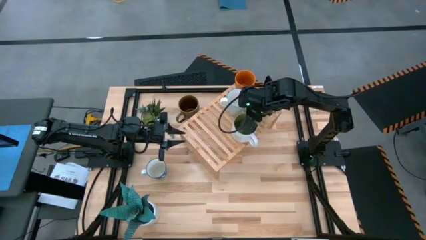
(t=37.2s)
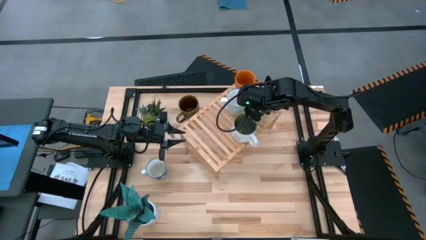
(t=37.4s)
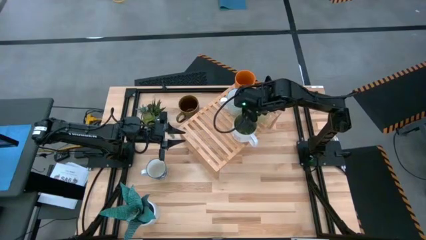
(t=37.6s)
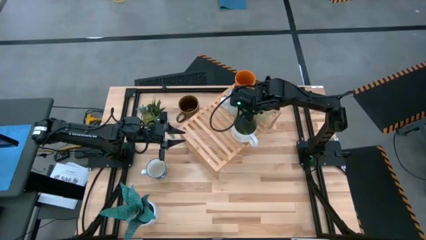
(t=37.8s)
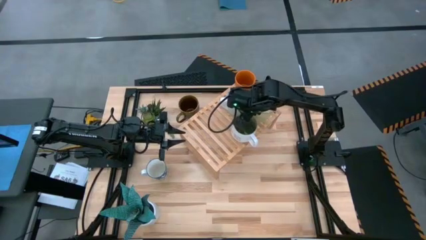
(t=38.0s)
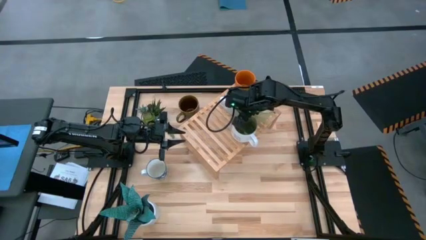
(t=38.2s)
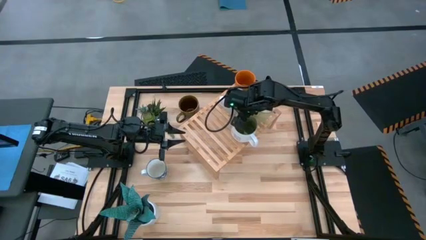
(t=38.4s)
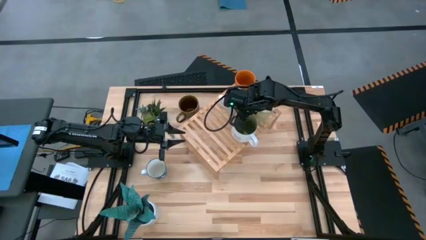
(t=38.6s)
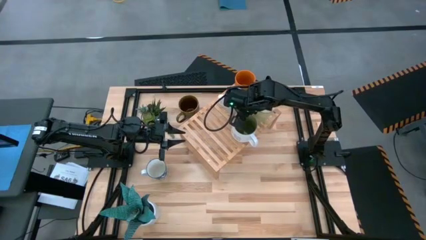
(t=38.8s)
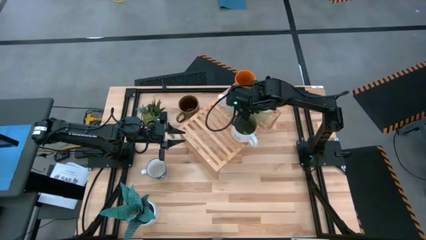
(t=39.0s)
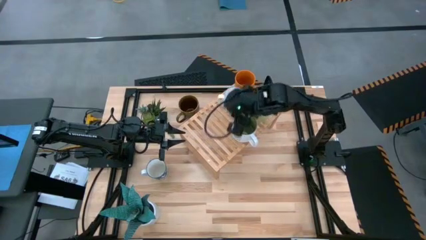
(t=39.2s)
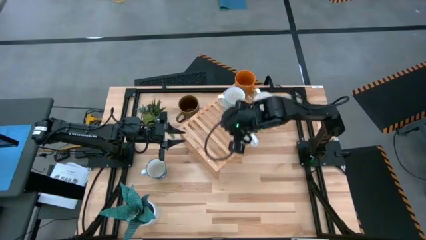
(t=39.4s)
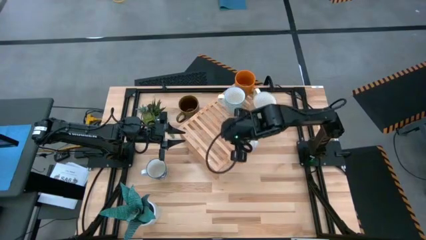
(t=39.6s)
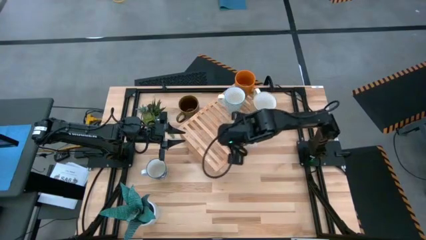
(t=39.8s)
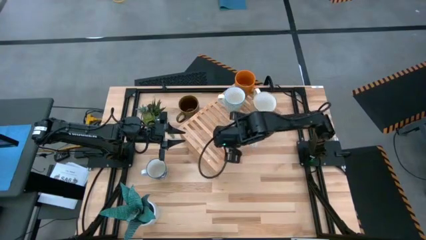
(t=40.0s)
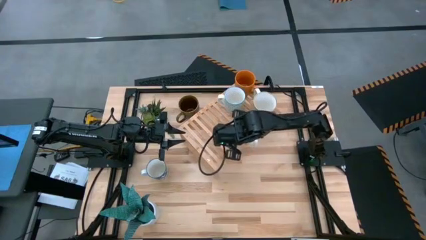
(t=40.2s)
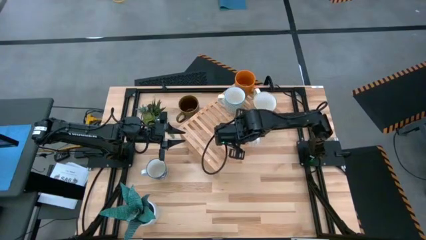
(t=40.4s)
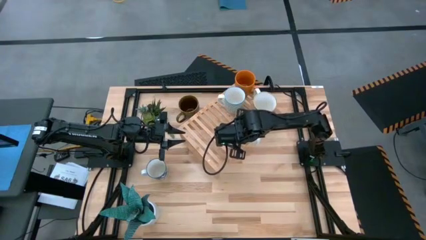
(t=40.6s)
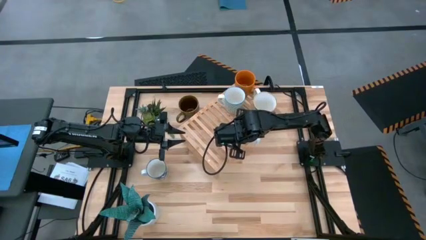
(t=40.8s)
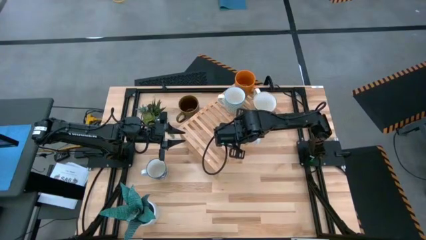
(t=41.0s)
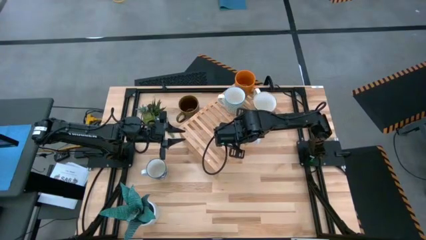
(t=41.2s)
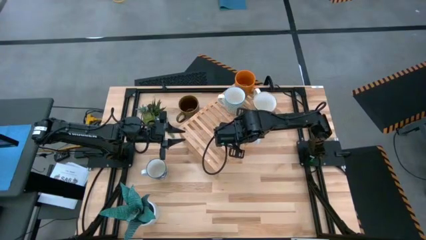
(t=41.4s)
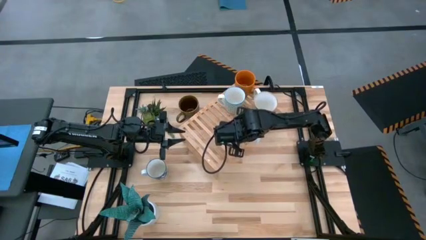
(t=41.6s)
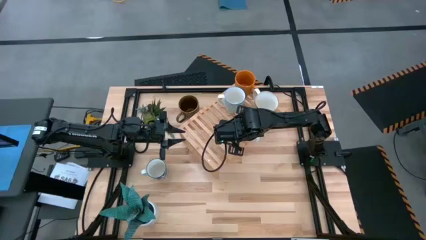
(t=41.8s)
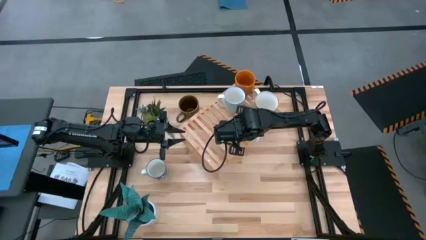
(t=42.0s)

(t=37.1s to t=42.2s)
Task: Place coffee mugs
Adjust the mugs on the shelf

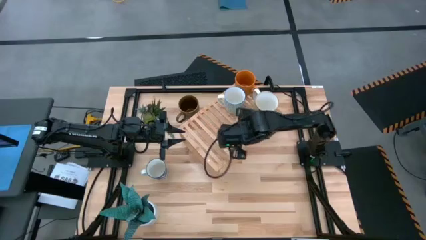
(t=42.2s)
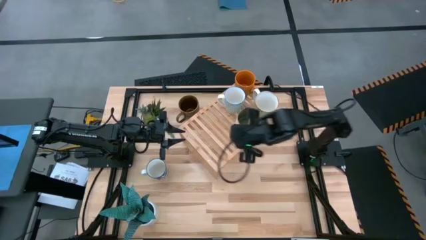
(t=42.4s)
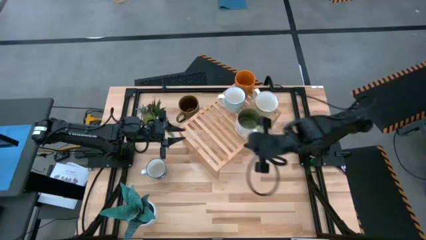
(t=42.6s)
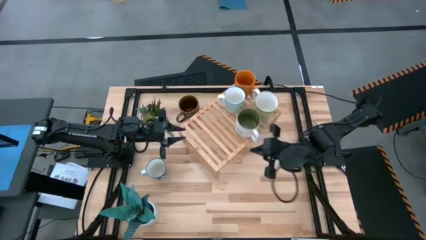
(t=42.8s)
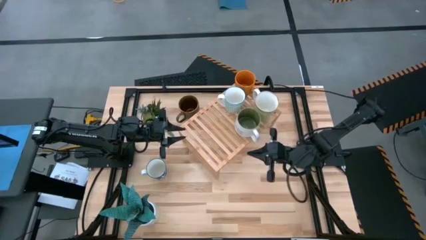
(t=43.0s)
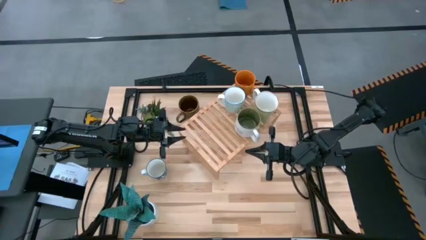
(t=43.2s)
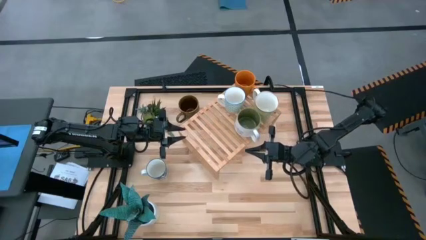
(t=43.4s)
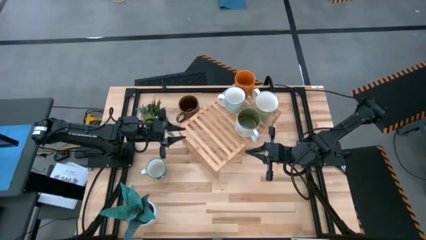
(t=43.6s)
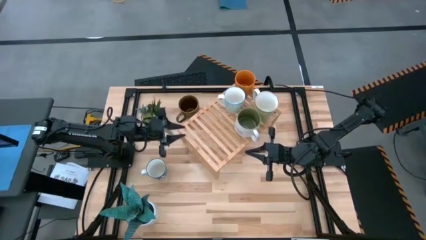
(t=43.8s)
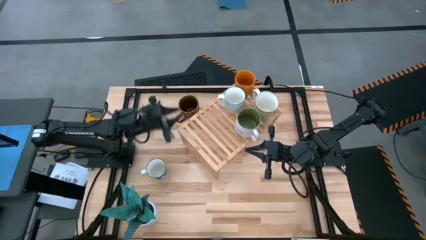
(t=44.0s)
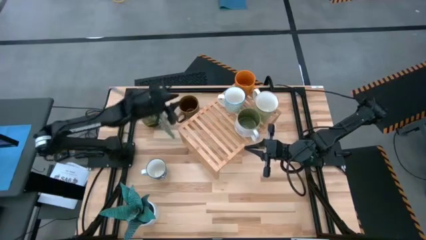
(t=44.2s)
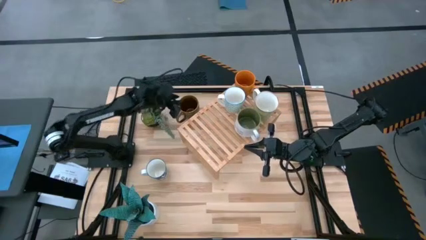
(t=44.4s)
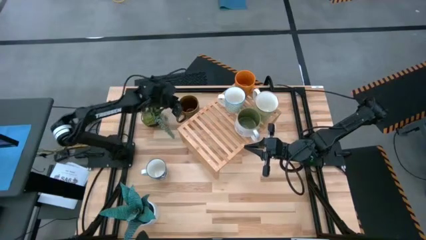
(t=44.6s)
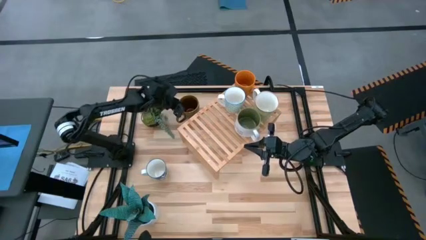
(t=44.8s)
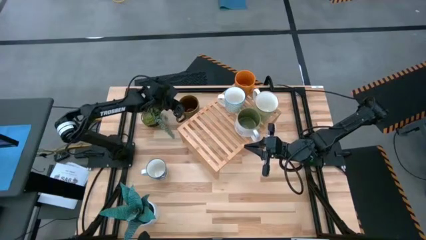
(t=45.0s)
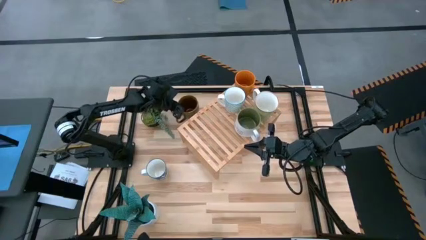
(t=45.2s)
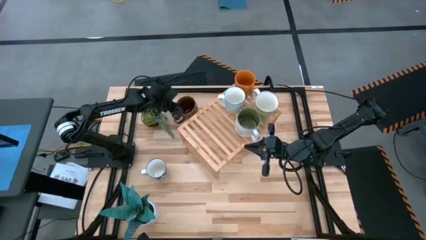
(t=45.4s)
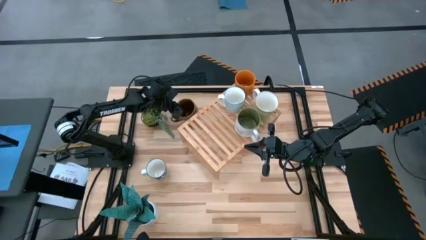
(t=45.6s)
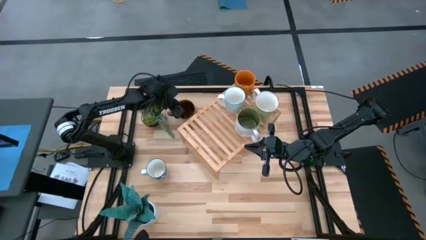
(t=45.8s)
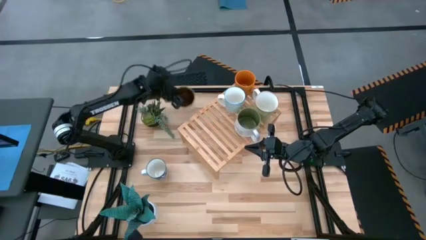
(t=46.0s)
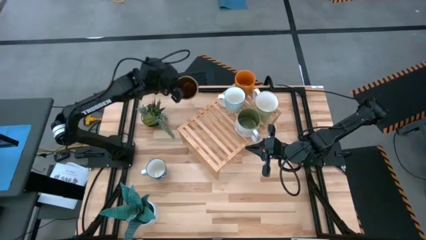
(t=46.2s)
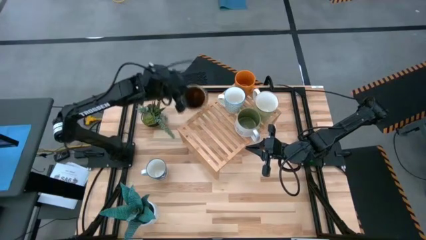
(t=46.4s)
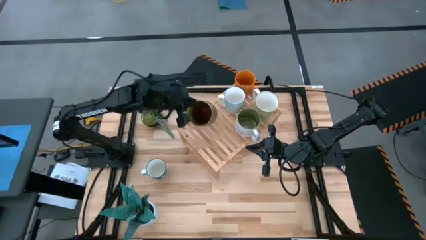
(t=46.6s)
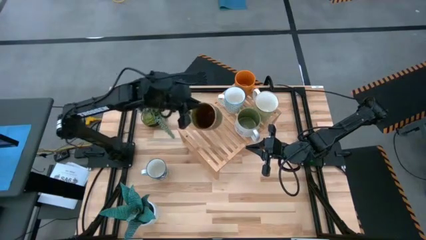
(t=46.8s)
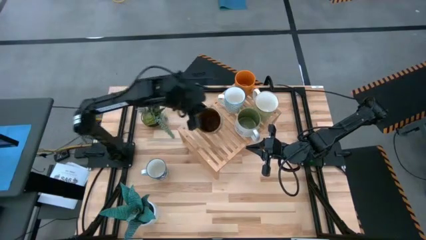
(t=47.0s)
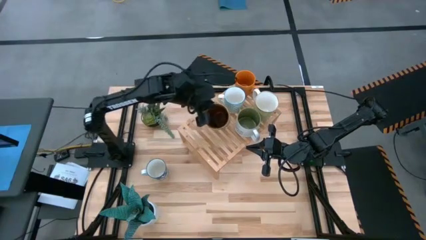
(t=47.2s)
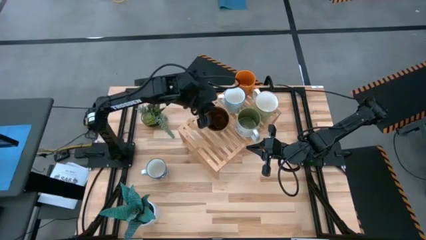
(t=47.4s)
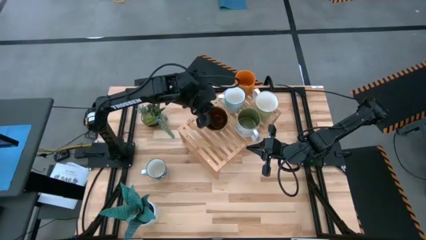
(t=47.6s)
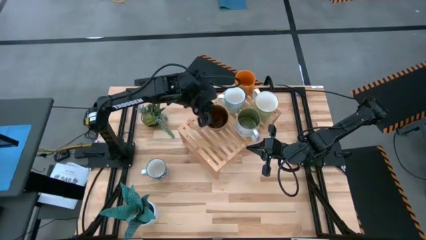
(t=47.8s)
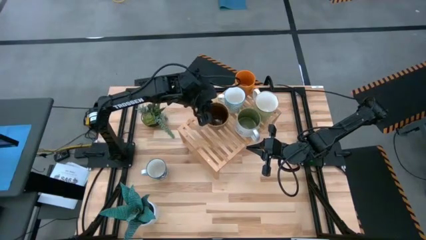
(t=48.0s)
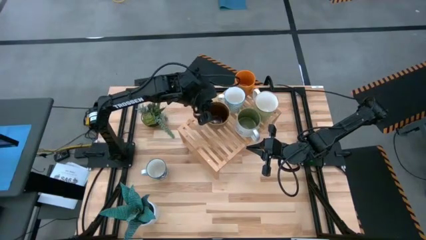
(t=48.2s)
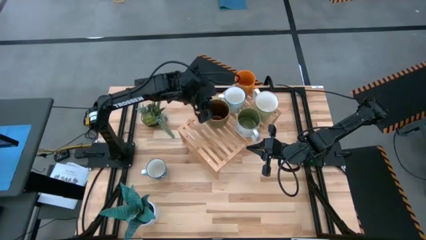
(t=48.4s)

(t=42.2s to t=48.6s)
Put the green patterned mug on the shelf

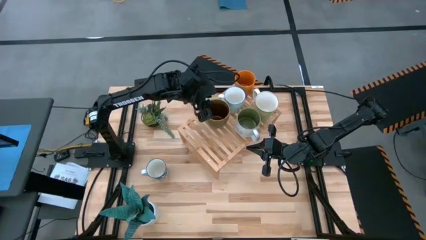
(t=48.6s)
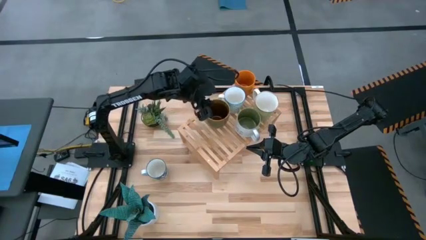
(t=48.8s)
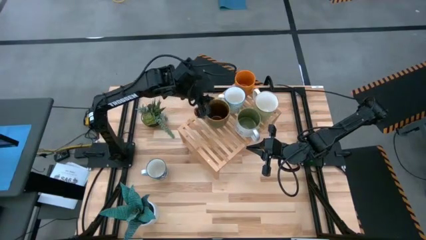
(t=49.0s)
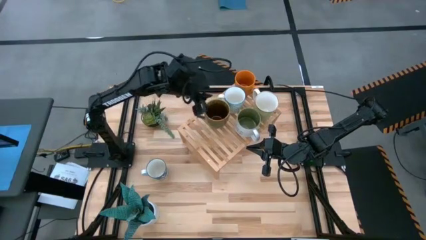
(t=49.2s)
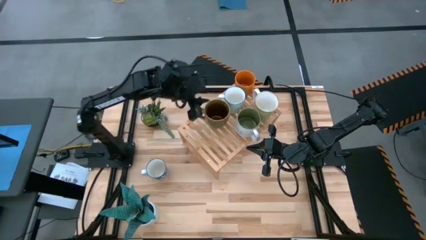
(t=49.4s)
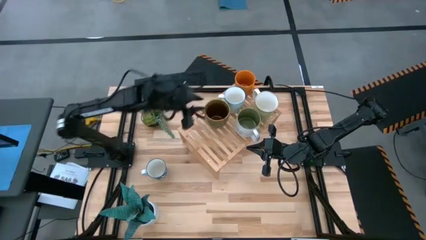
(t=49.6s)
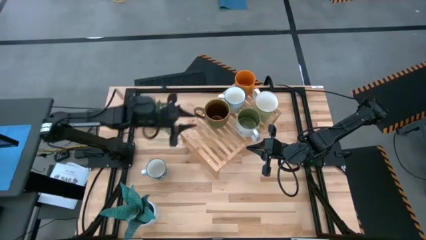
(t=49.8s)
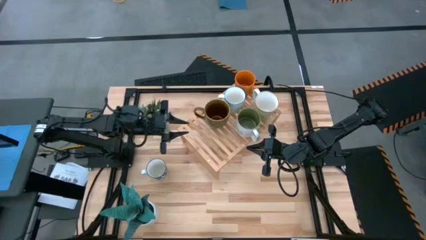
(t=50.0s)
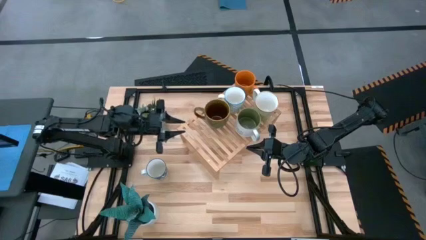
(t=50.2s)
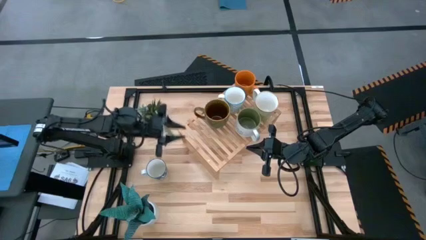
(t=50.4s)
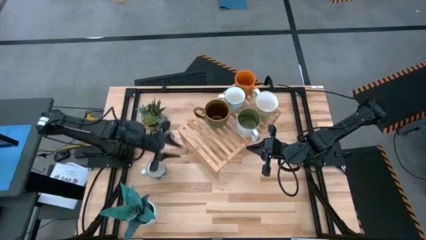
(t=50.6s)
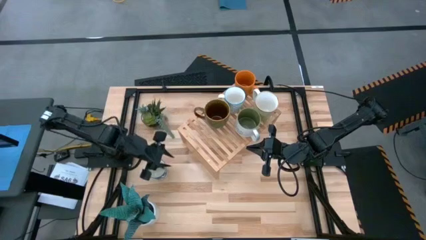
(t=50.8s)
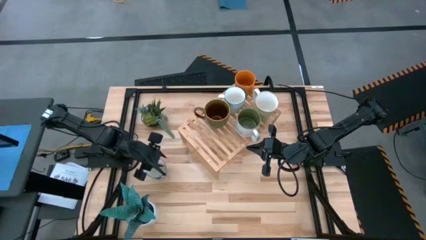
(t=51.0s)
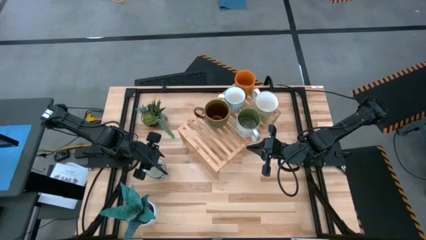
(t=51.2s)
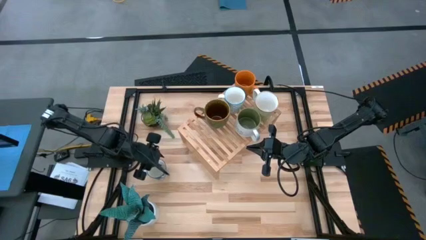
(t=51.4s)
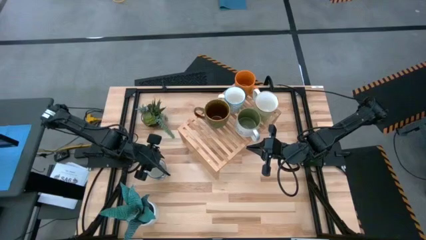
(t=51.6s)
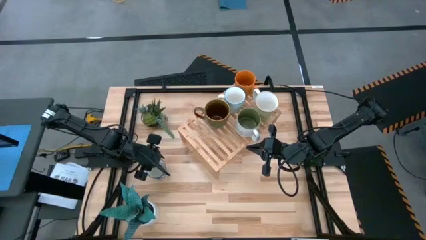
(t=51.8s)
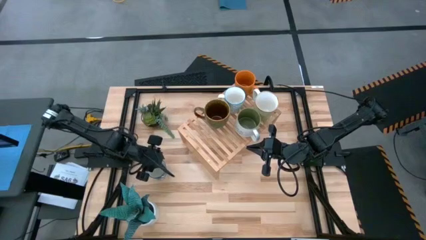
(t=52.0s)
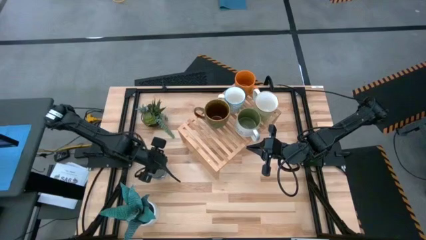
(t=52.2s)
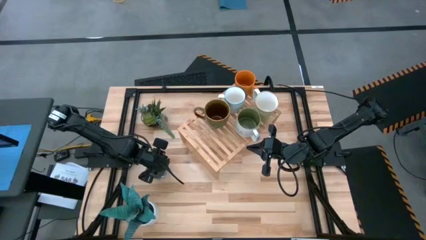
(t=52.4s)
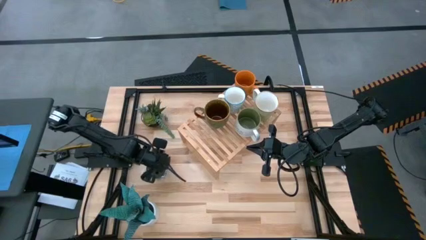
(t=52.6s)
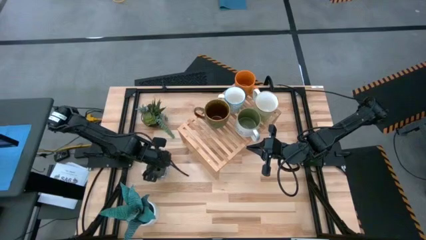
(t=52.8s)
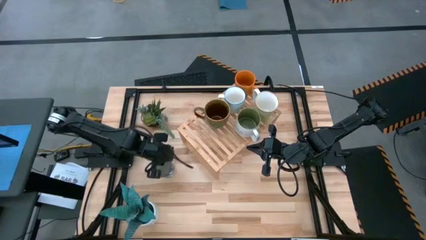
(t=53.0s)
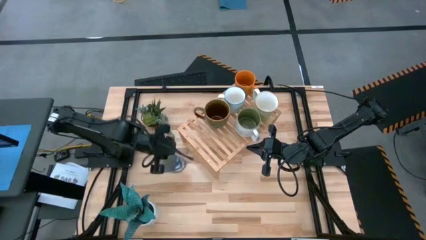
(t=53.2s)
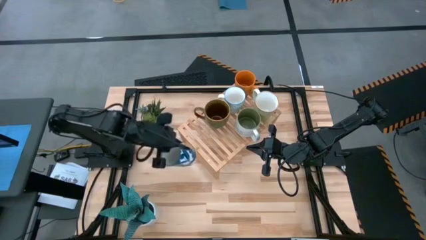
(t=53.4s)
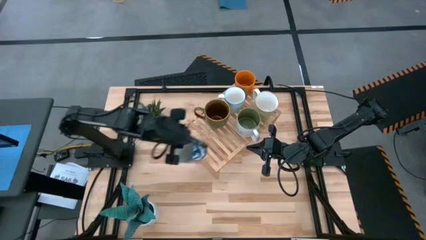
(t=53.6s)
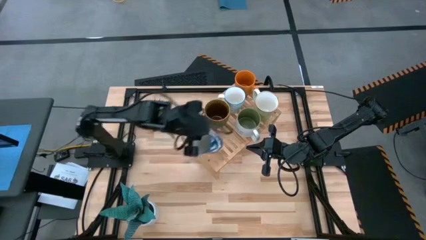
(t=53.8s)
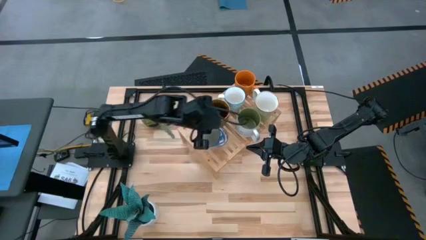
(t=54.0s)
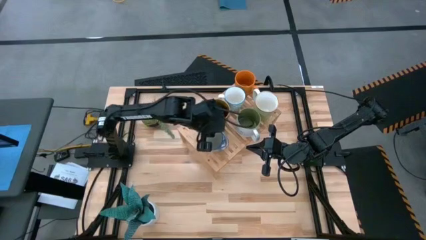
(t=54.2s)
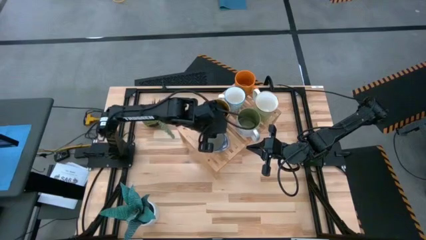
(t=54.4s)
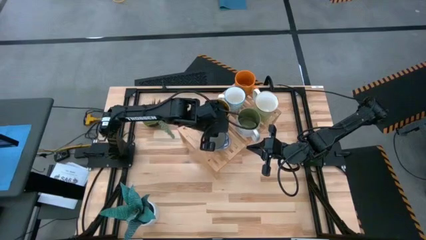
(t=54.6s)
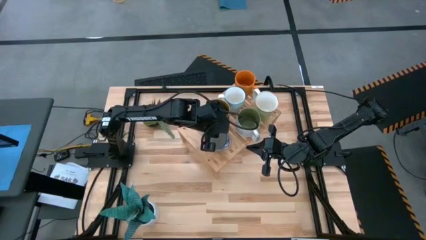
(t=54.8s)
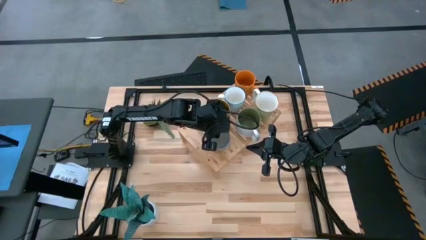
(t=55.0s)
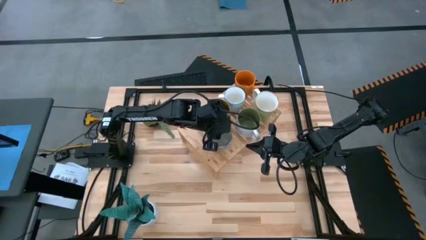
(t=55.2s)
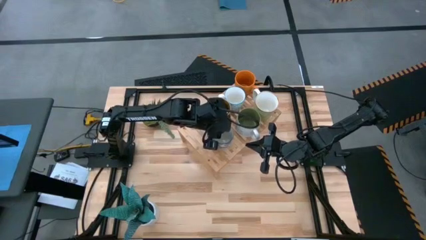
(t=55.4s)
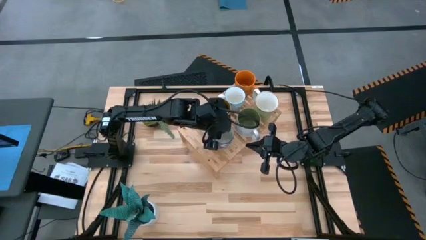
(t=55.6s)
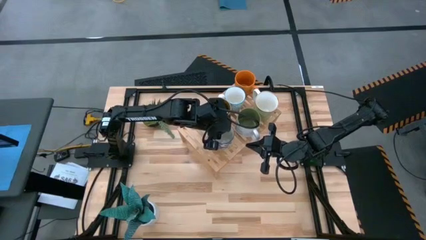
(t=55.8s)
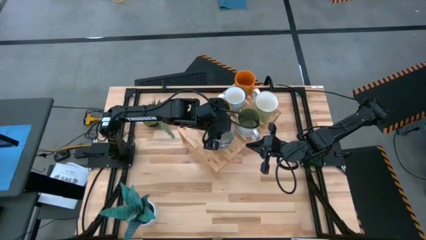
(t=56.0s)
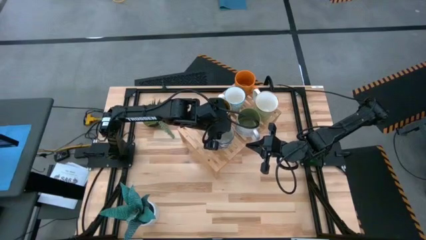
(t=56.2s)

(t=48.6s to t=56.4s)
Put the blue patterned mug on the shelf
